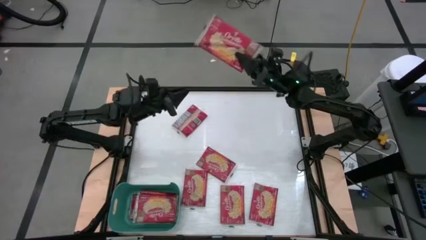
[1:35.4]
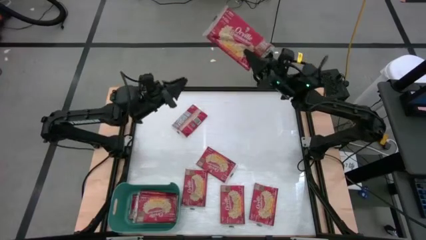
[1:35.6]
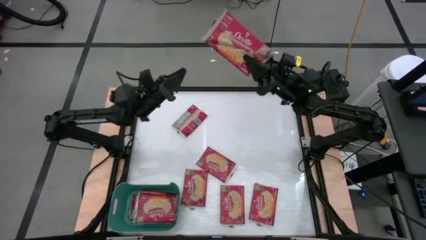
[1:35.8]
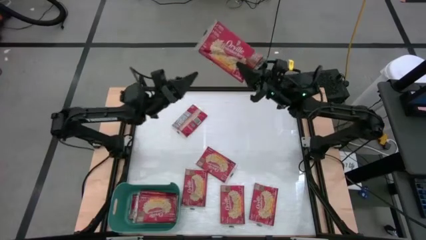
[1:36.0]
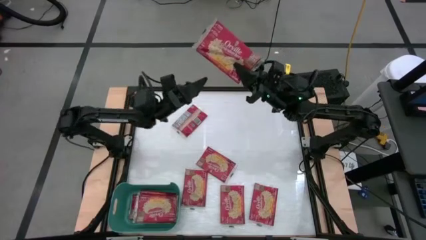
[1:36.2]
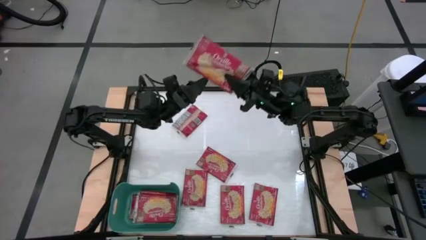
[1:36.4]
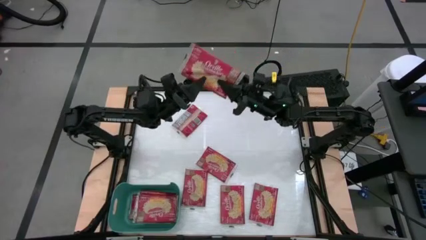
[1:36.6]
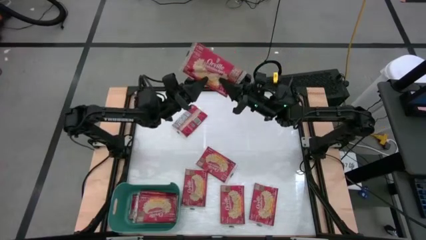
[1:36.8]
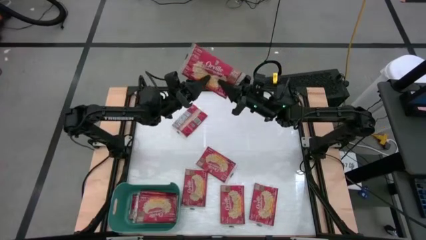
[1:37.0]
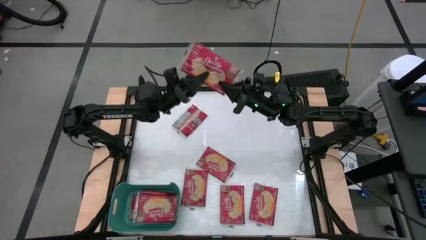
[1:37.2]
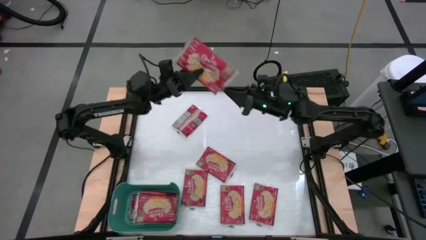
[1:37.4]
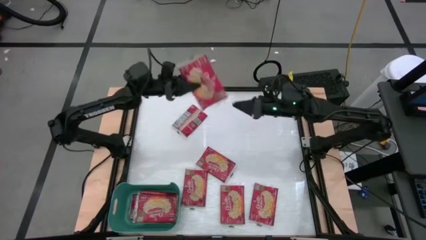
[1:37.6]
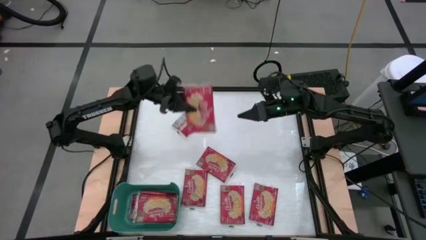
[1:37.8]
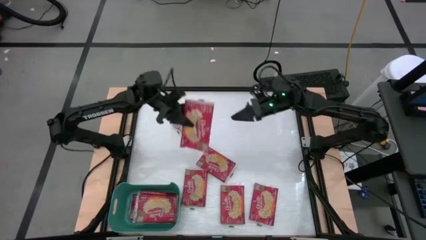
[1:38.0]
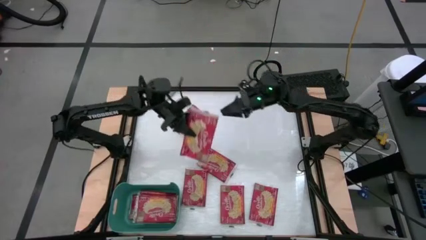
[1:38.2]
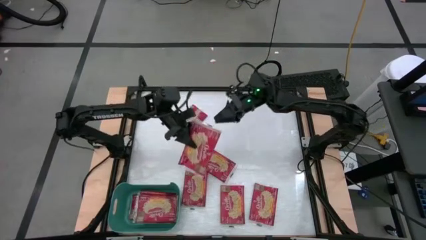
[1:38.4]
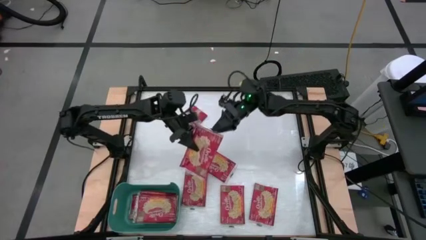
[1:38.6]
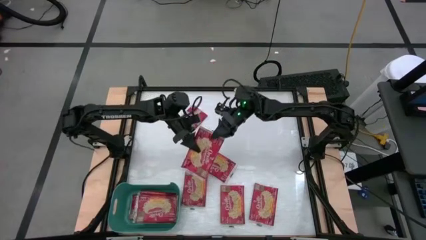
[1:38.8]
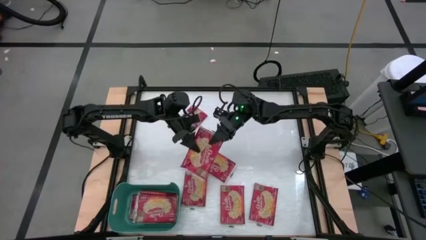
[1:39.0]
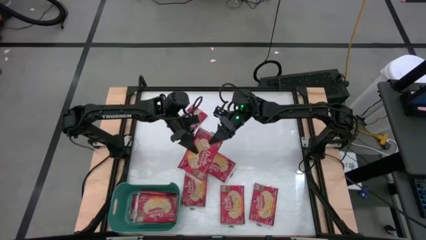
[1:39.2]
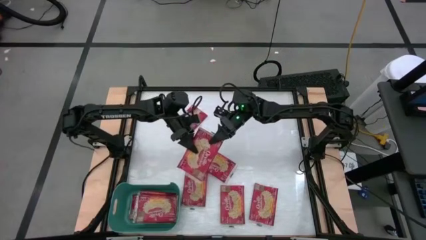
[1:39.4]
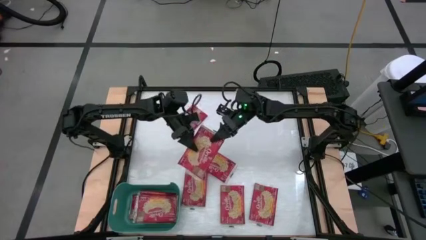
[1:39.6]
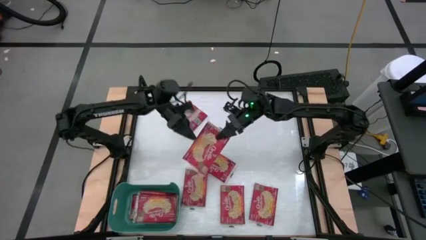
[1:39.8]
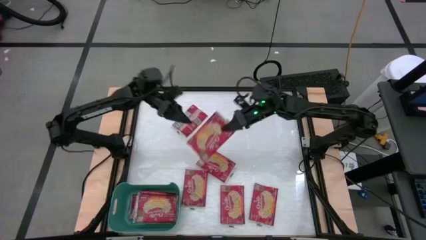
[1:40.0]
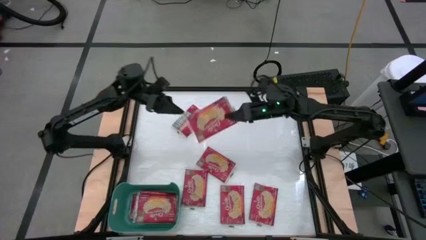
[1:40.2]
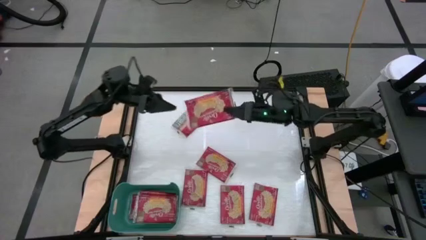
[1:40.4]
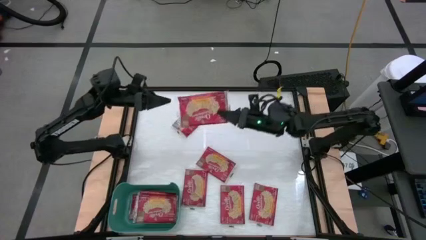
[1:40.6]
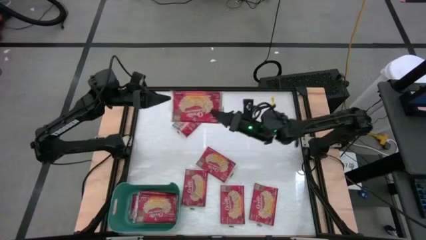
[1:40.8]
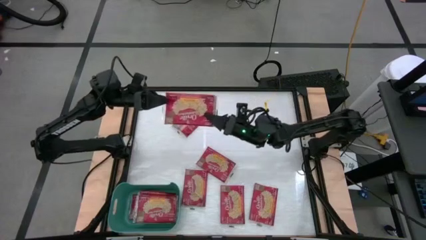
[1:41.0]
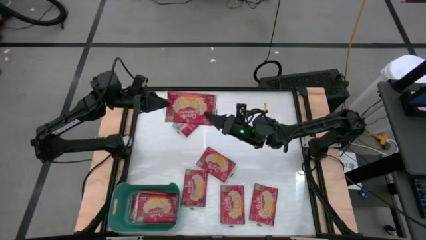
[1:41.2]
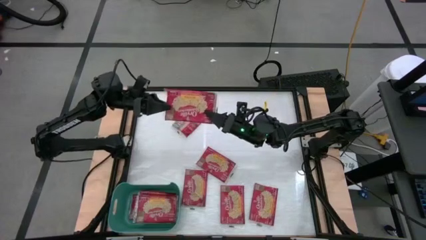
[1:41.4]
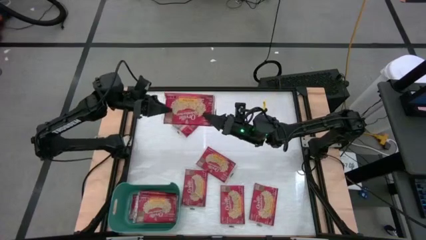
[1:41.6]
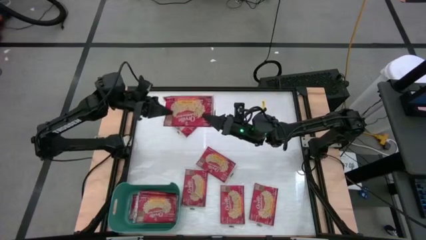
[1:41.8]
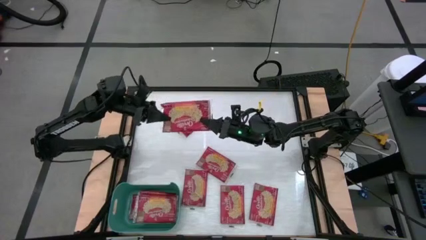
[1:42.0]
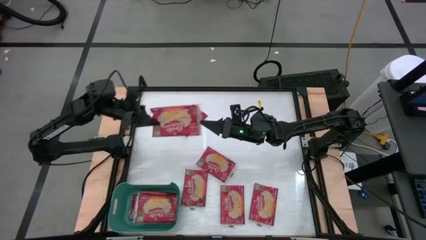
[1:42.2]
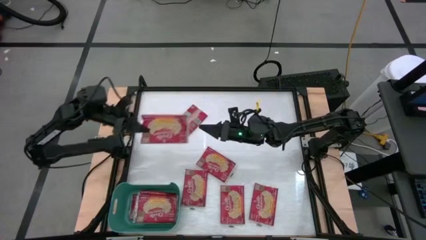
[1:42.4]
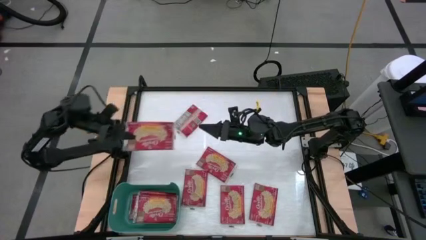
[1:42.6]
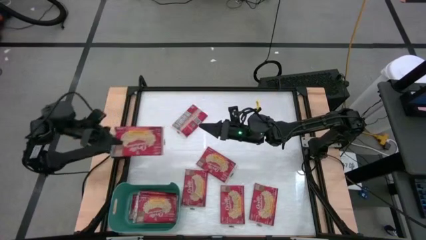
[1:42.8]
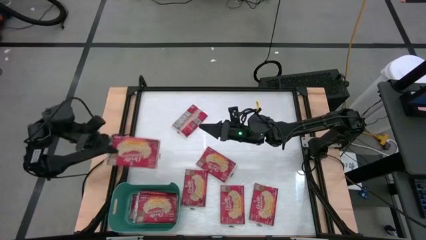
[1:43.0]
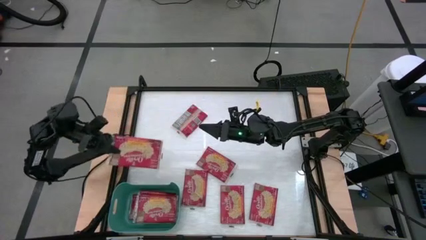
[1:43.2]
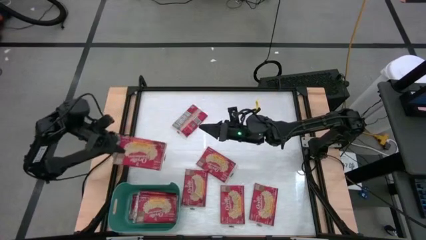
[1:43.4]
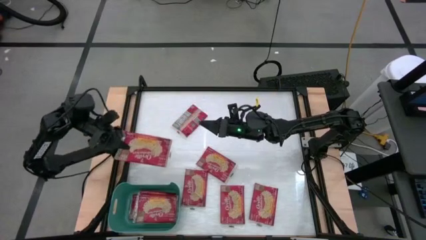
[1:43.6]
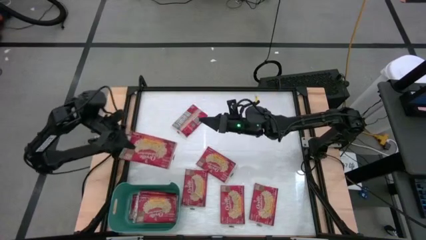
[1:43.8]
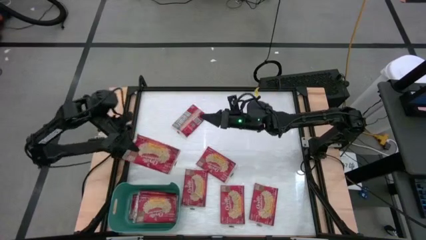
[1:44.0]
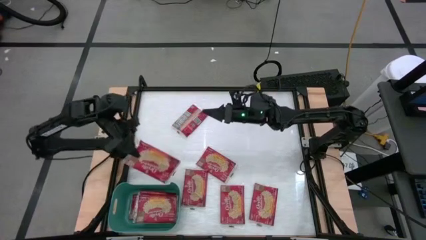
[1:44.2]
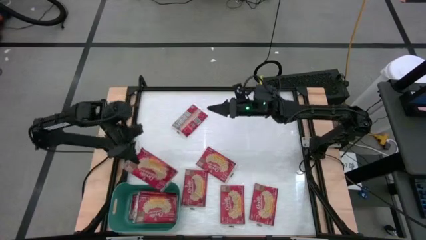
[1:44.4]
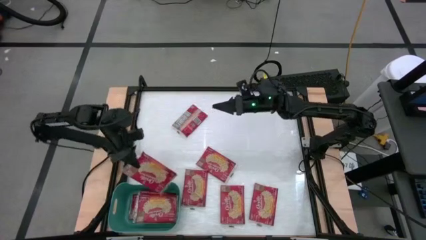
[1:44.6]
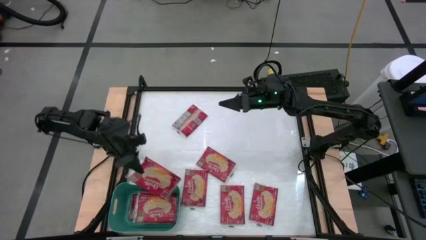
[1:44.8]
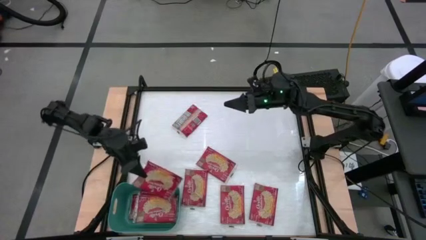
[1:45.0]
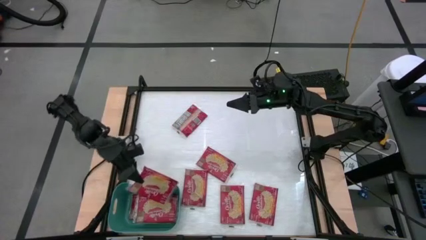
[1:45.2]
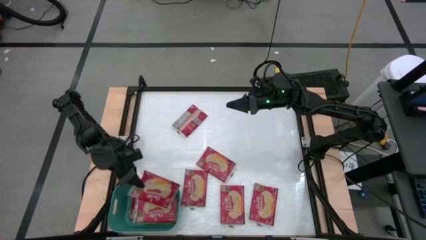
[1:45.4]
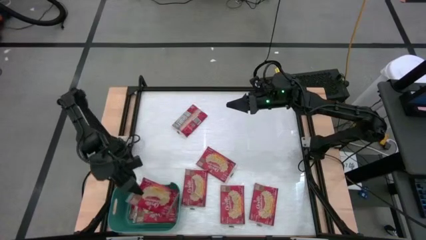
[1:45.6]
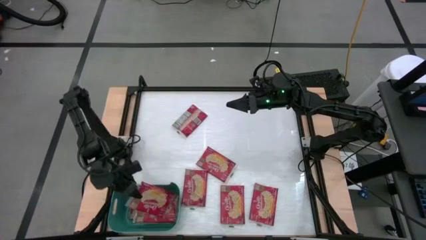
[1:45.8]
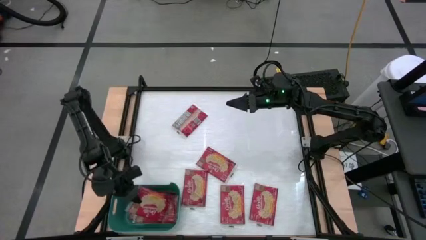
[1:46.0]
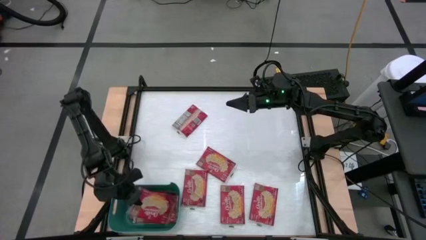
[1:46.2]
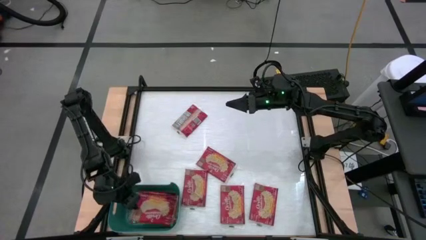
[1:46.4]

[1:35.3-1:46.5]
Task: Sort popcorn bags into baskets
Put the red popcorn bag into the green bin

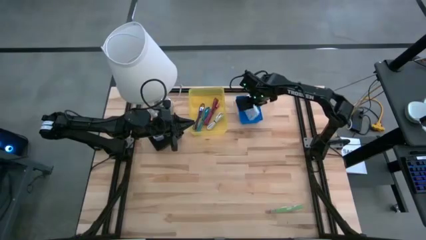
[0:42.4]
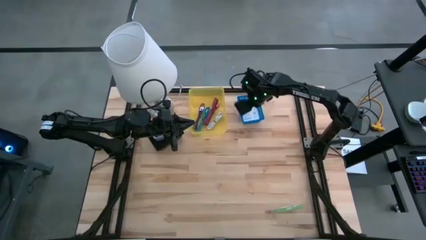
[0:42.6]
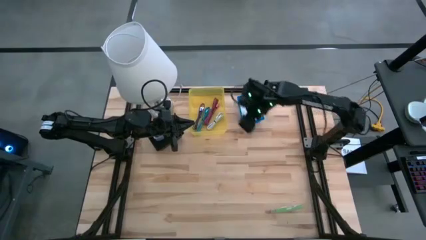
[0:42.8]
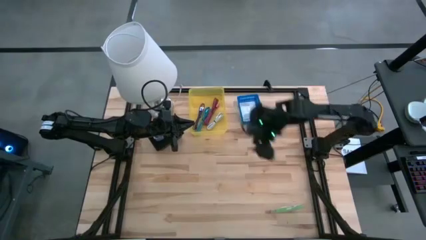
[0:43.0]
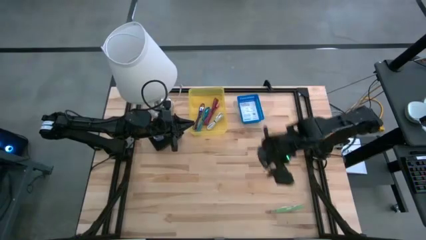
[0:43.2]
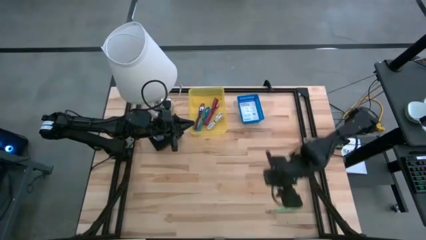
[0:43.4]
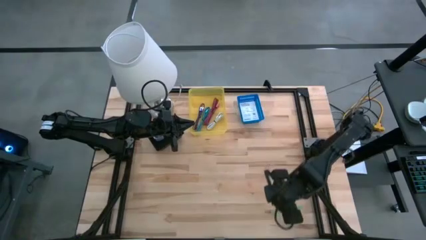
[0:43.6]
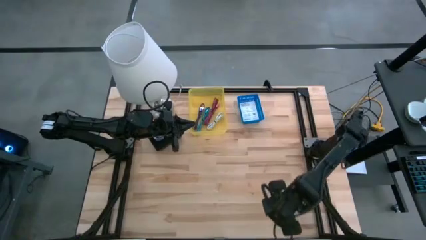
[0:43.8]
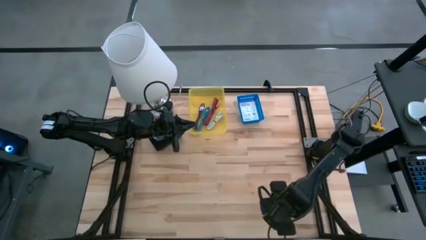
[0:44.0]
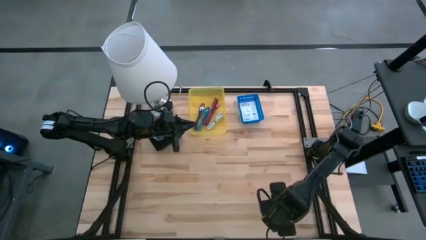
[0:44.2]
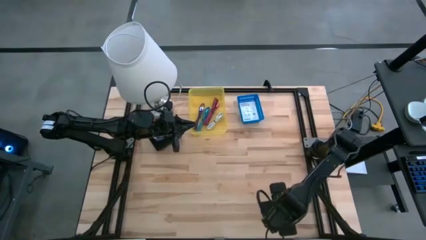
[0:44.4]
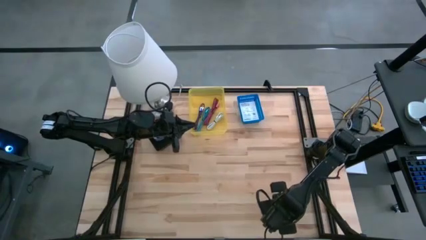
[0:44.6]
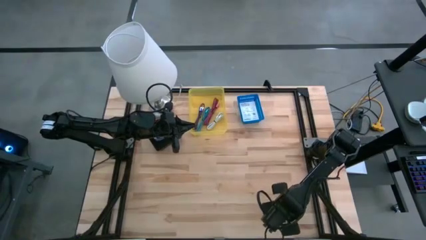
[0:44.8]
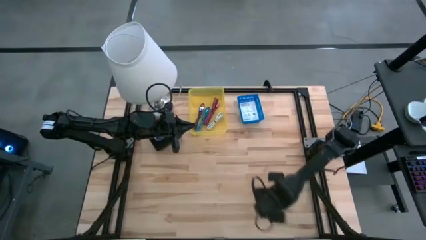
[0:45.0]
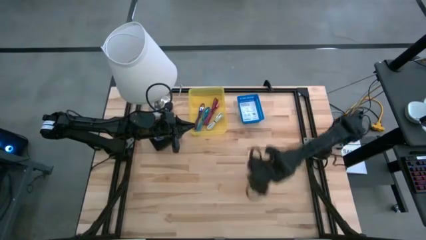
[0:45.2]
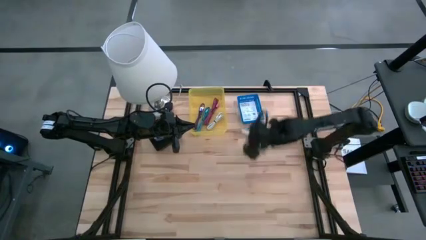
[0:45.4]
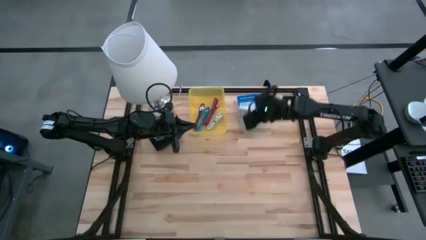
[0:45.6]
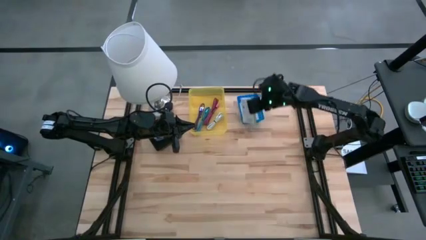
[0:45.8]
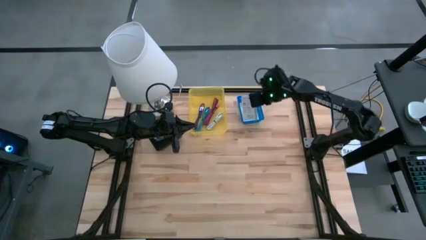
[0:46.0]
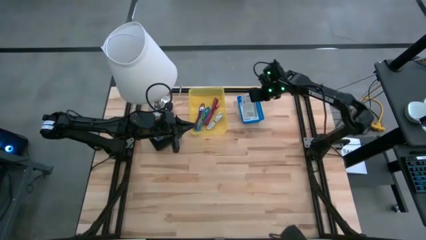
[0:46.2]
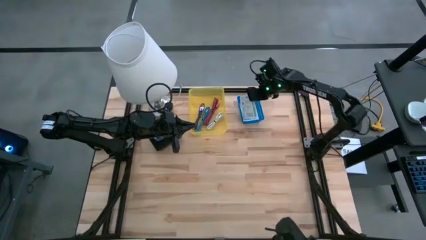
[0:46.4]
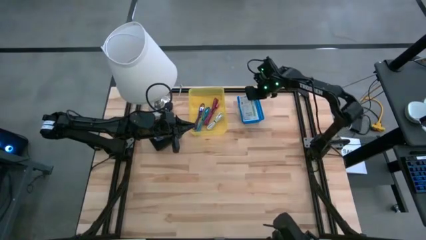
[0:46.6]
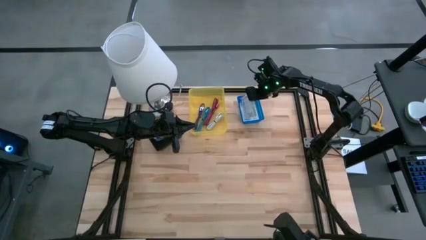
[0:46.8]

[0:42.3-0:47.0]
Task: Pick and place items into bin
Stack the white box on top of the other white box in the blue bin
